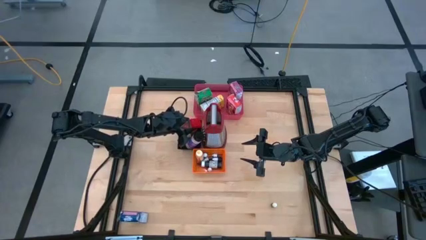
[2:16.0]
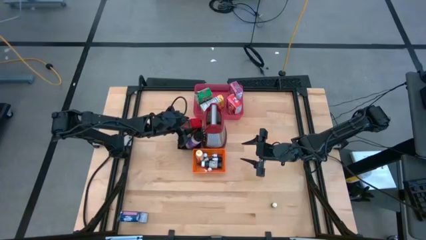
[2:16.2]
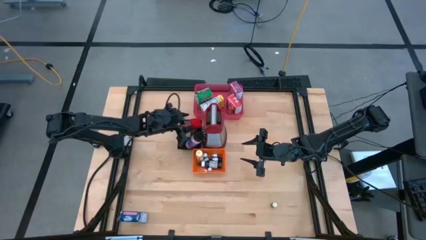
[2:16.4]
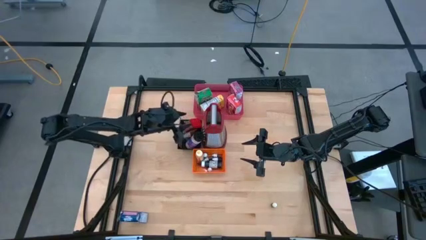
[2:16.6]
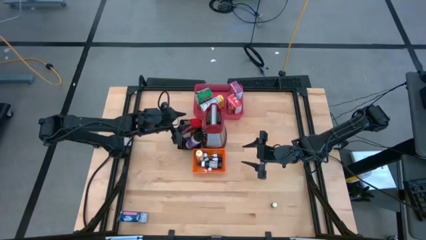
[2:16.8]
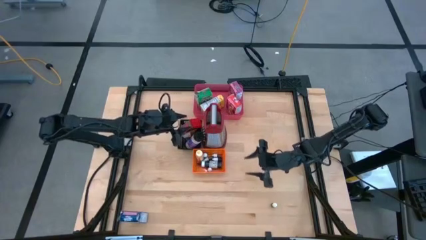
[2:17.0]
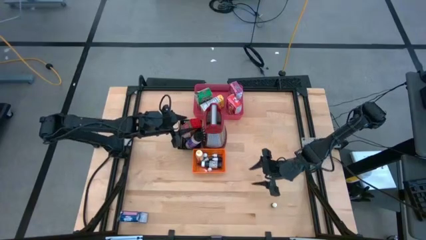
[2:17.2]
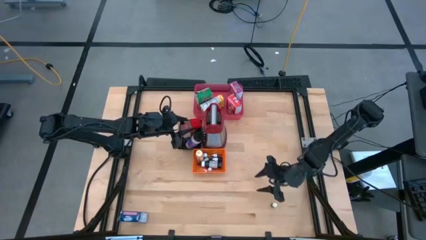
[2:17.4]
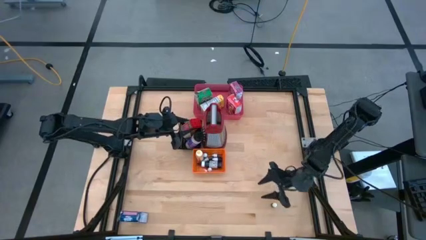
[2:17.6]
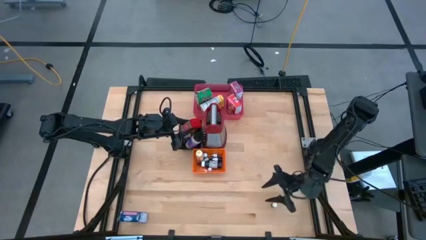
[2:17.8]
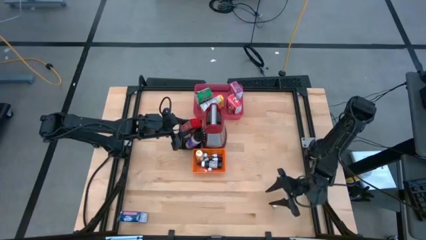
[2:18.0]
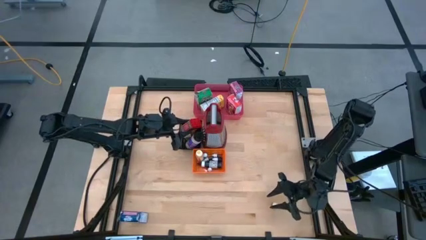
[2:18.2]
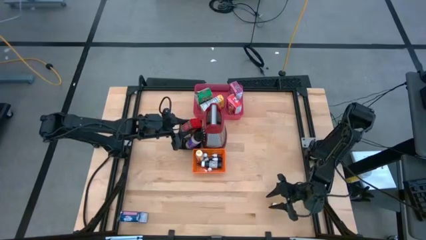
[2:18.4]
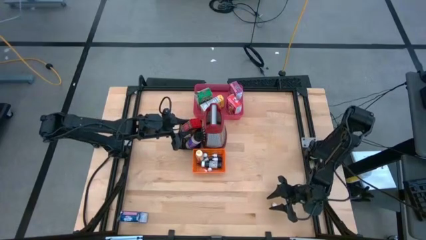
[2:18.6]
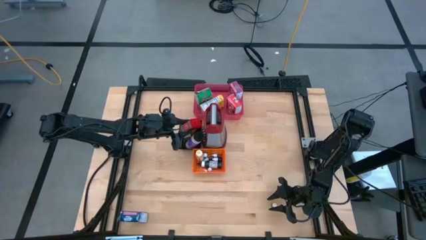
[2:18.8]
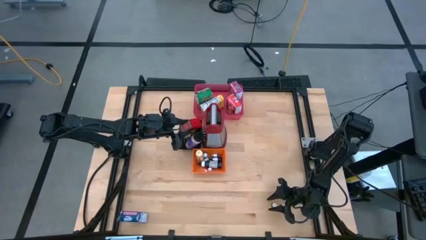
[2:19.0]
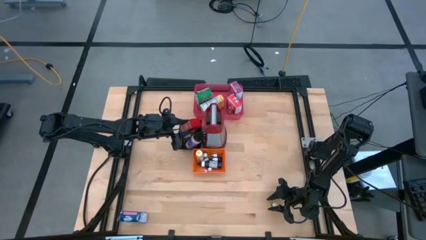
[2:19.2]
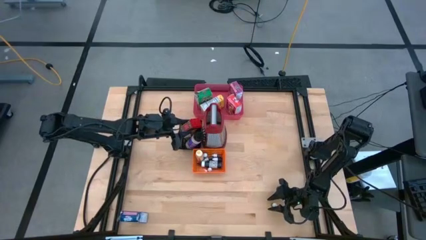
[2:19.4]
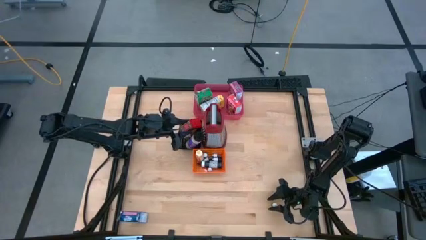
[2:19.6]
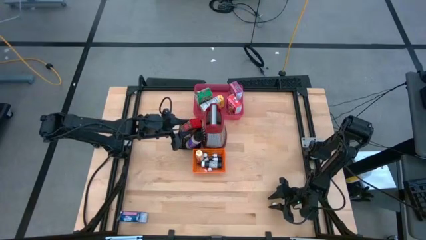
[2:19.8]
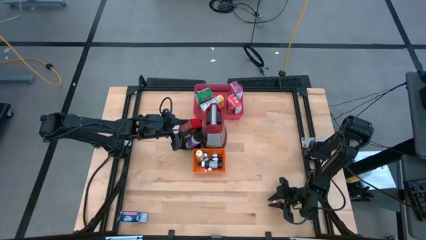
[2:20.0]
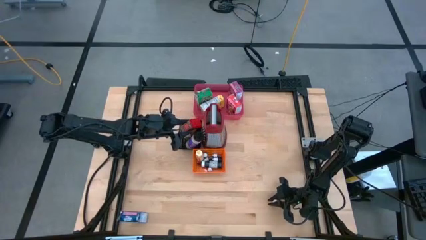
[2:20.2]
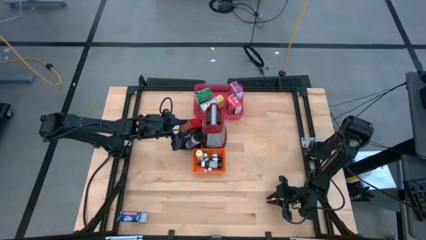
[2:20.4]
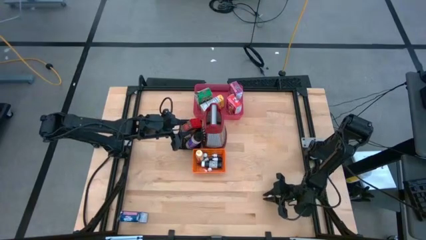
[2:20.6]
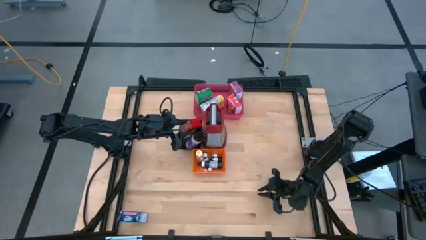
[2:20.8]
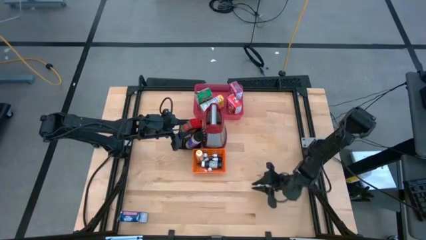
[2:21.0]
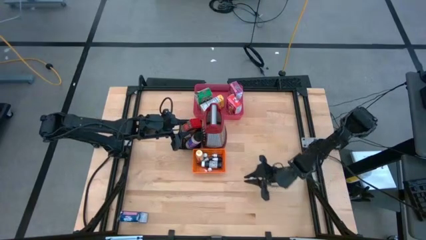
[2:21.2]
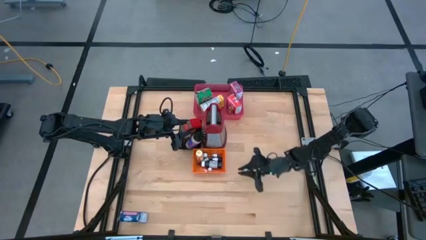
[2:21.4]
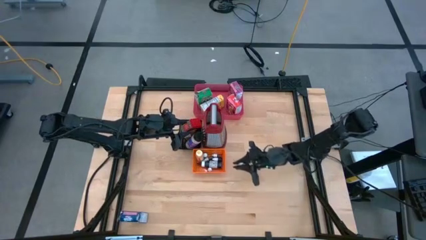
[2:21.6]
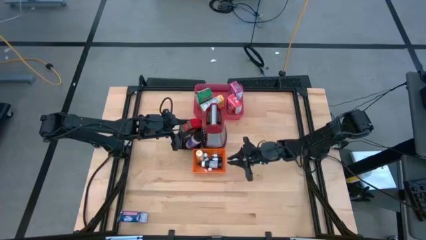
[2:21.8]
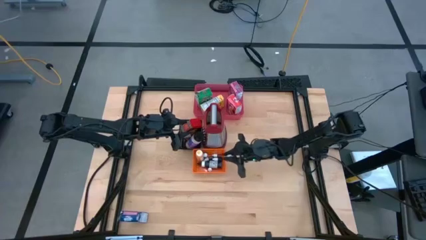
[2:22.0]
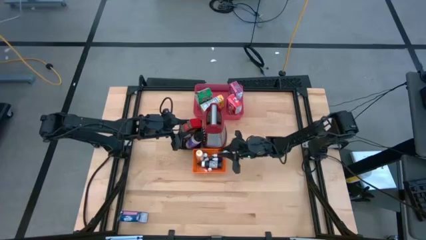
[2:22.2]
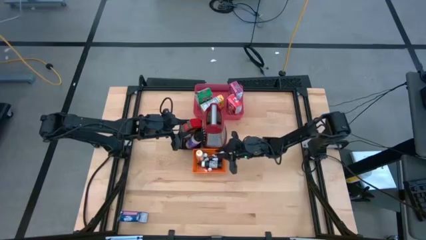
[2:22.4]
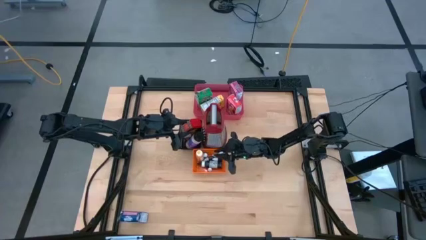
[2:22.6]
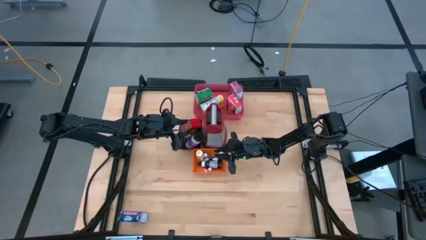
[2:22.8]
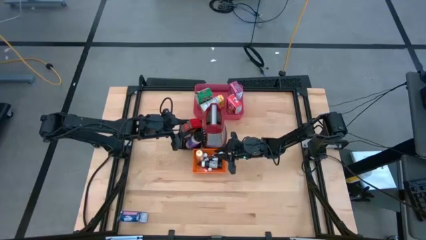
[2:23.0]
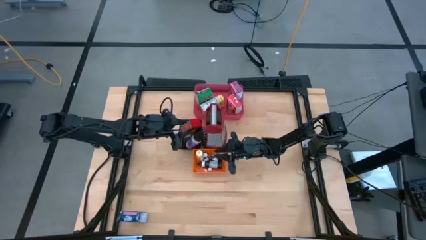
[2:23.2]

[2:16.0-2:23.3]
Task: Pick & Place Kitchen Items
Put the small black food coloring bottle into the orange bin

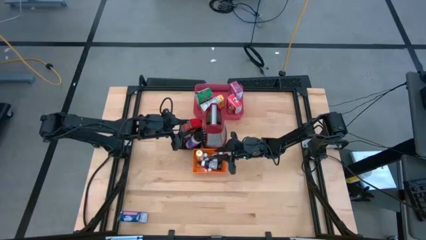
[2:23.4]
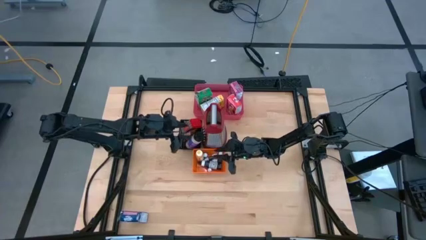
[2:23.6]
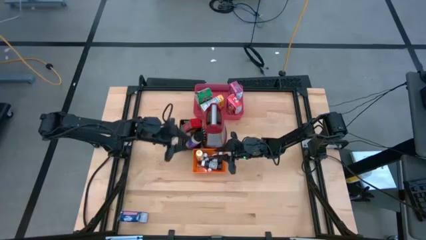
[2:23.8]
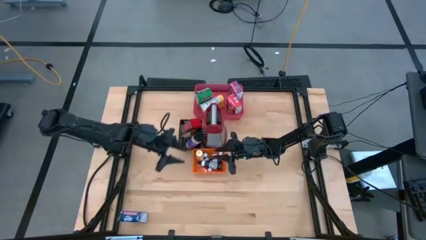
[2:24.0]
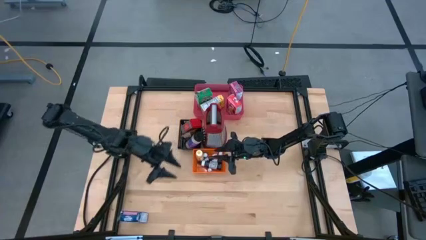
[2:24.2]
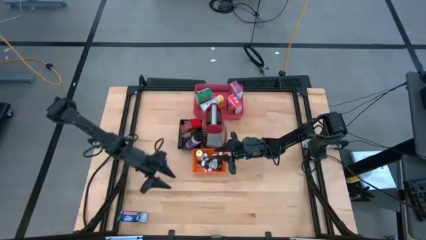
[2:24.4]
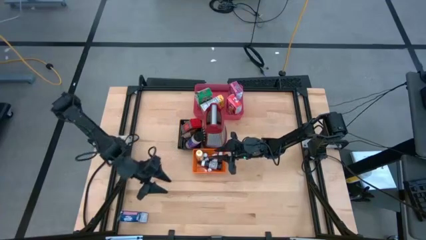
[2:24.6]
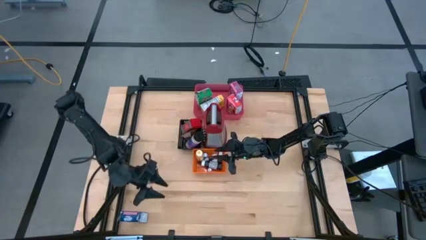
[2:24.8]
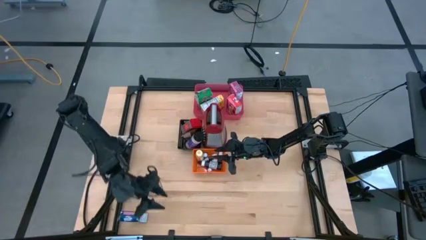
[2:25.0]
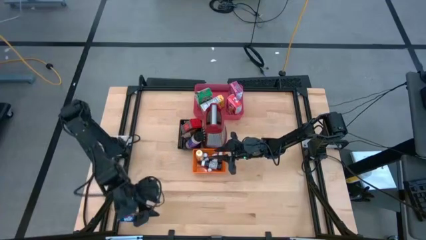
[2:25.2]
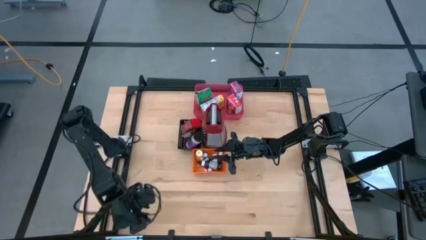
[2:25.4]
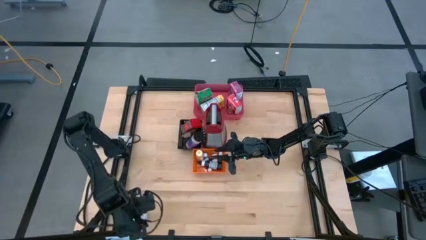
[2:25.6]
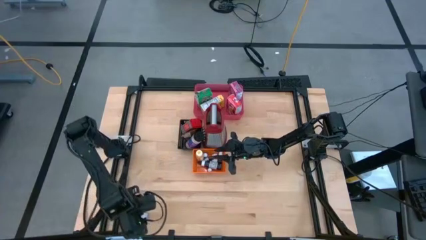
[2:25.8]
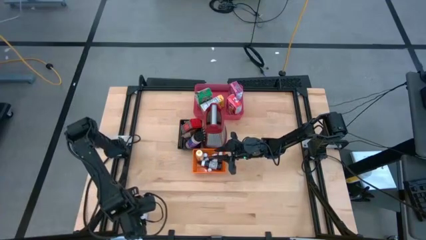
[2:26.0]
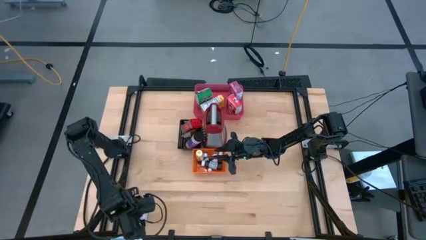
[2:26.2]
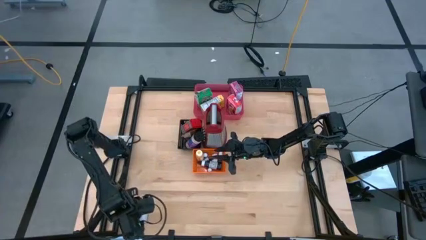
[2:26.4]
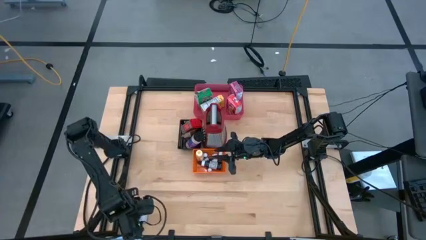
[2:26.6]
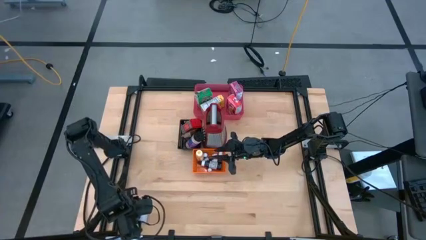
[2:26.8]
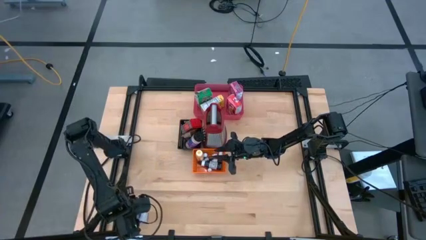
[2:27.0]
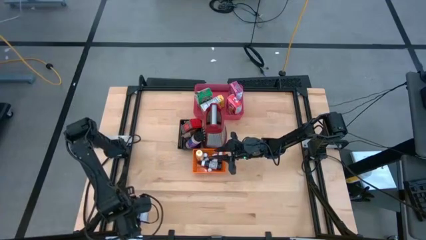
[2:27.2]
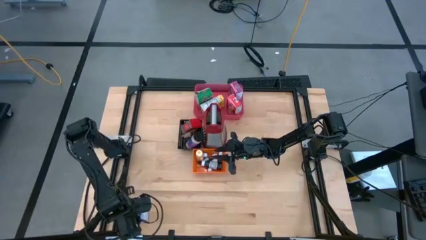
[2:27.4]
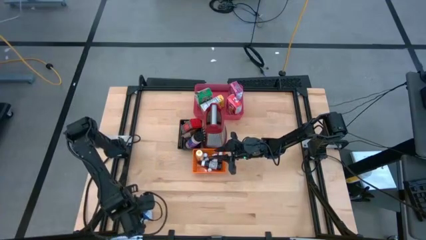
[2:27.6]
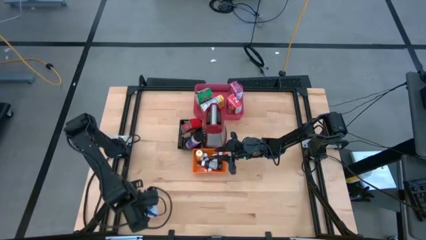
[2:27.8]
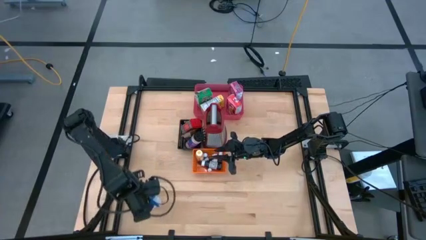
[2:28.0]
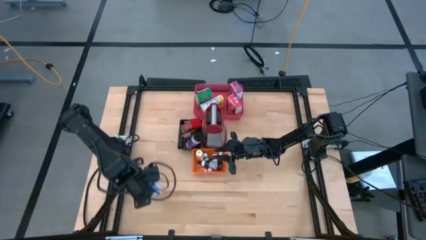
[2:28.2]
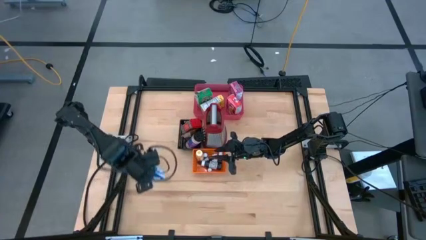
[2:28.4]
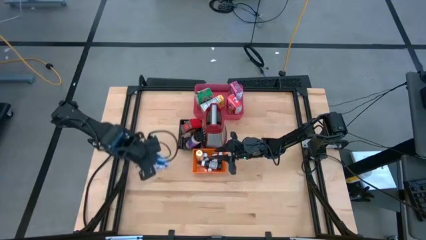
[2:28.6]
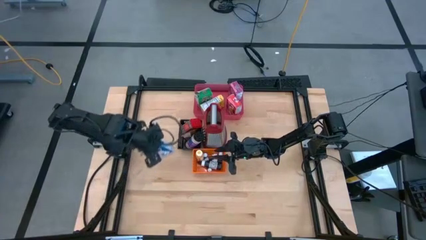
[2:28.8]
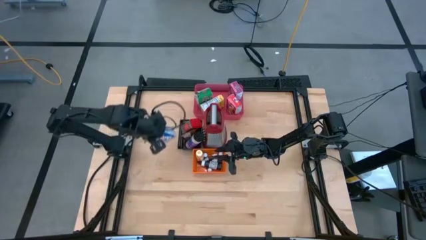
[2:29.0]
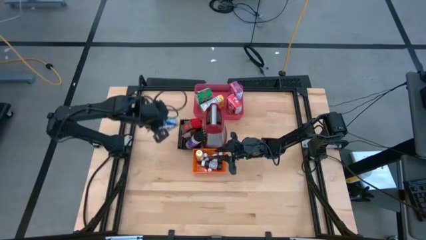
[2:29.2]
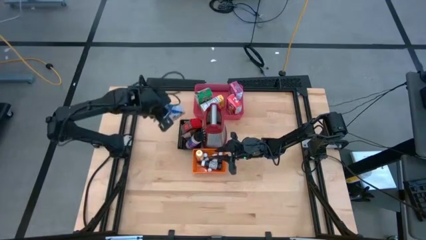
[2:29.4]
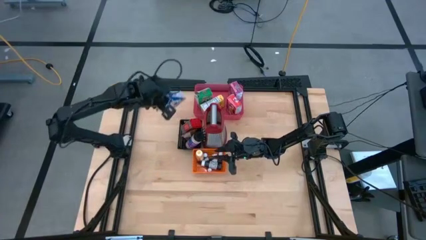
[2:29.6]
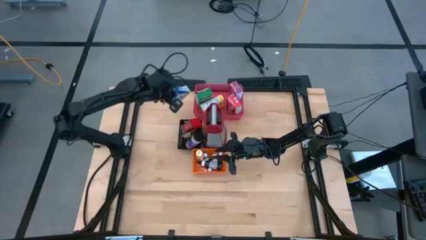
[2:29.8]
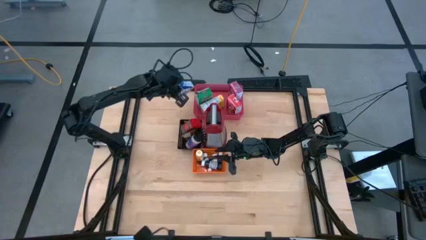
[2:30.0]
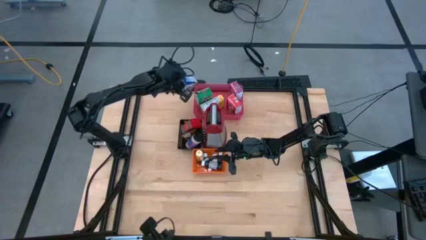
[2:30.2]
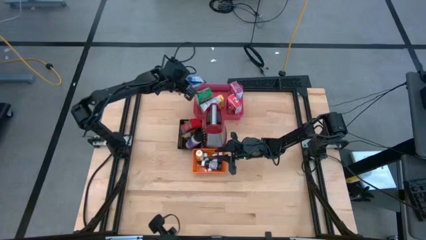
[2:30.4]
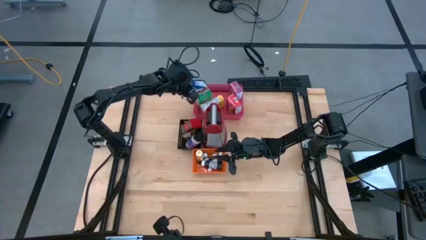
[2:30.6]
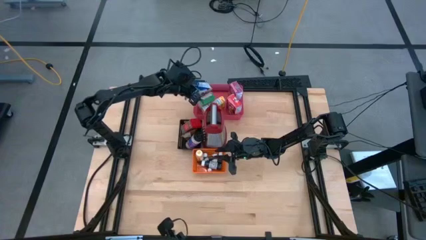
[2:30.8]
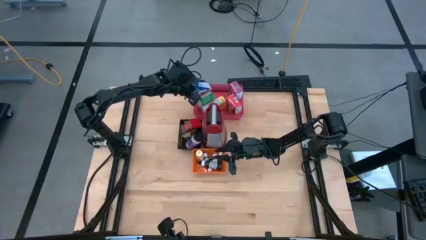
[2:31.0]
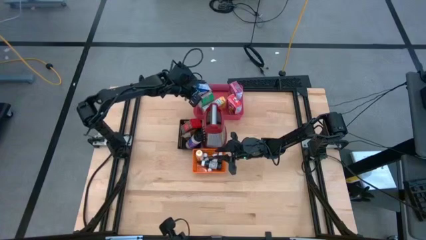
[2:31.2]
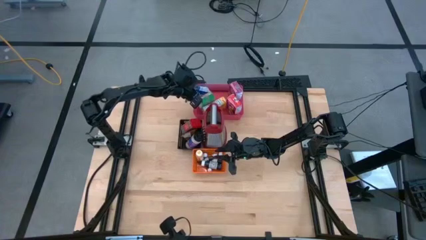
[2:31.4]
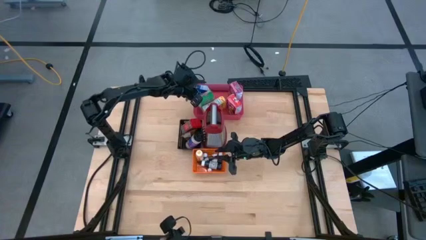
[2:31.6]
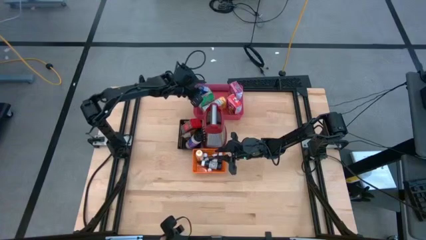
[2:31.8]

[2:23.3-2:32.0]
Put the blue cereal box into the pink bin
